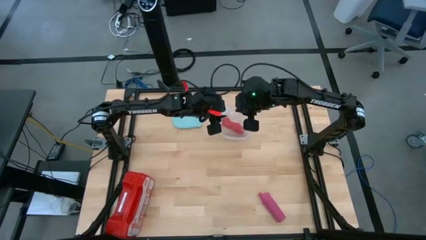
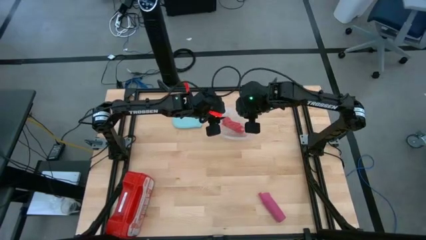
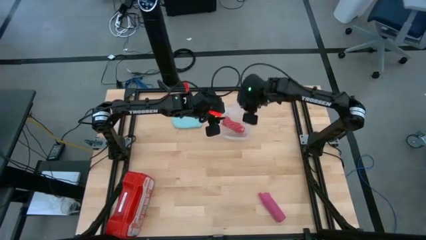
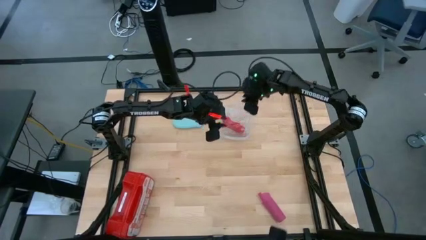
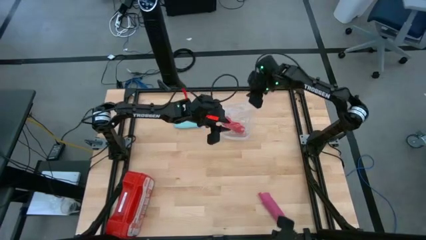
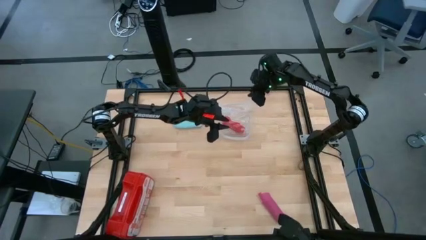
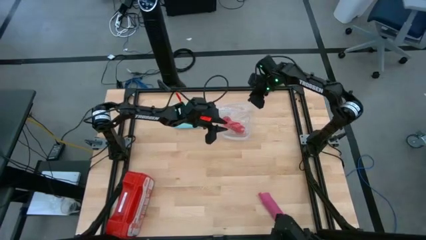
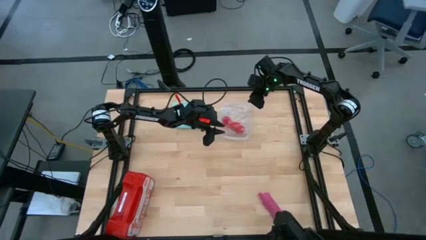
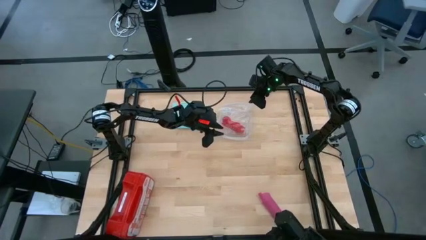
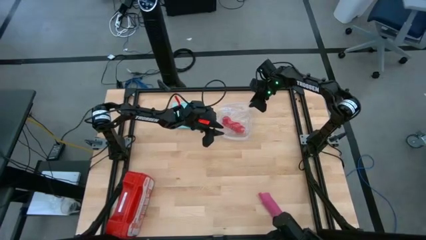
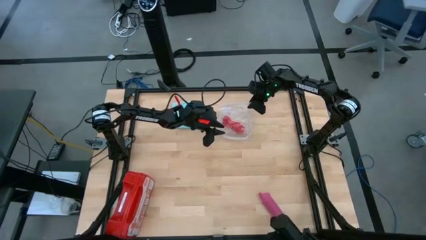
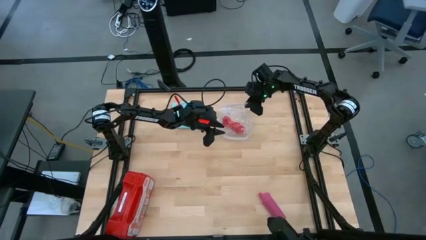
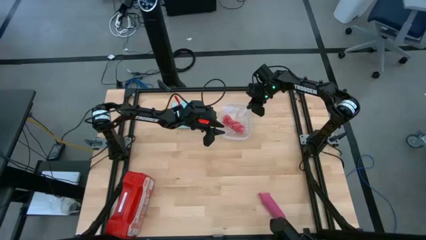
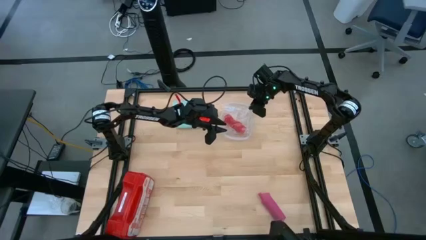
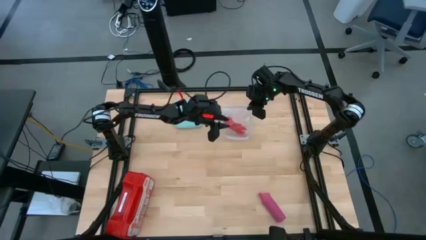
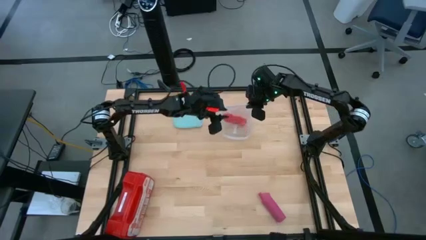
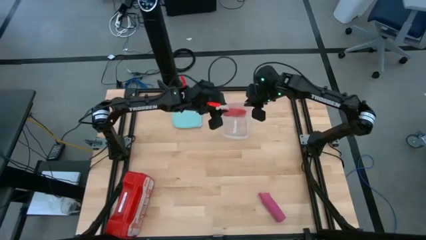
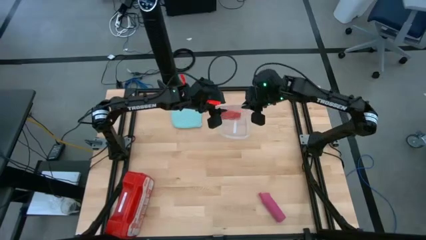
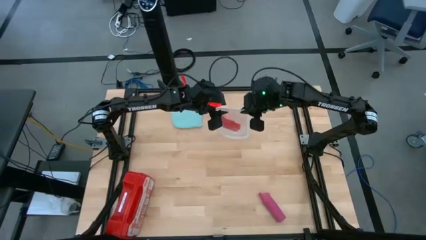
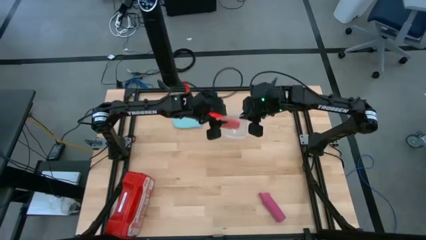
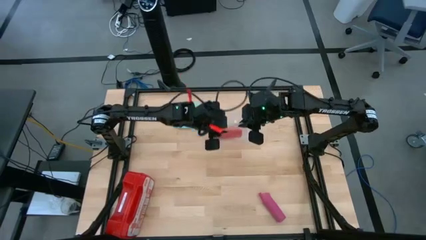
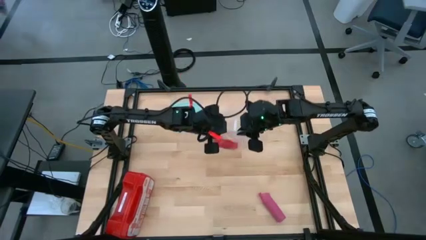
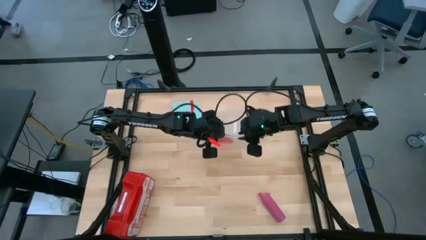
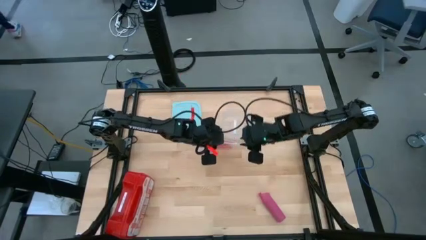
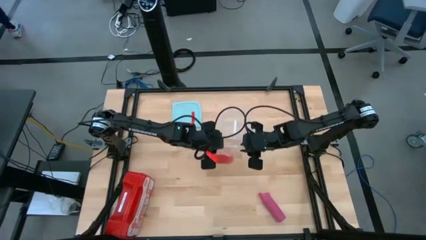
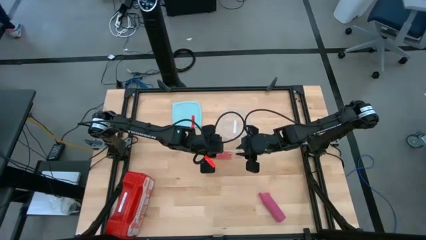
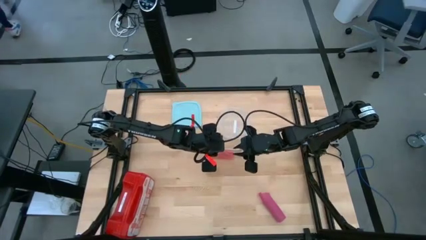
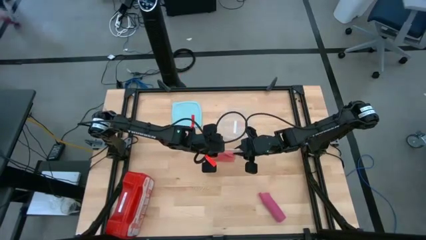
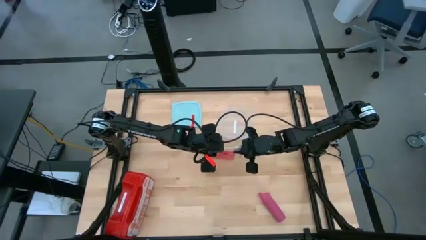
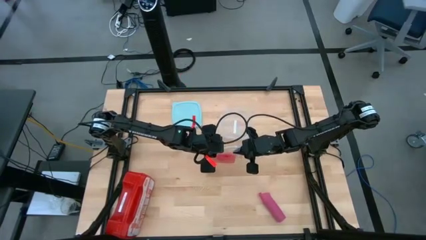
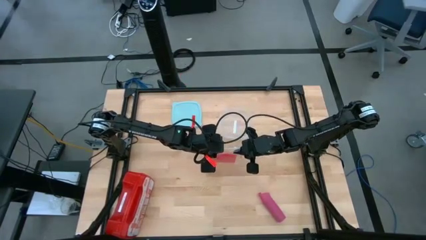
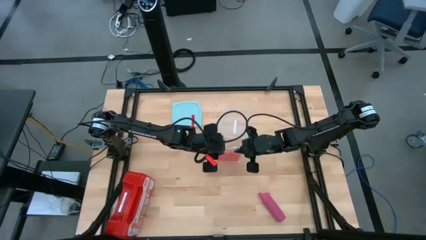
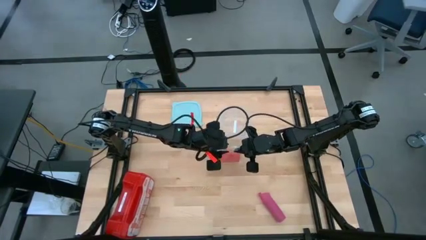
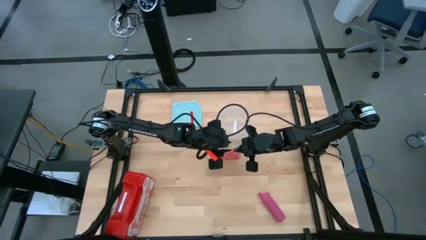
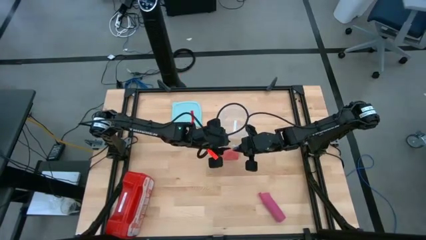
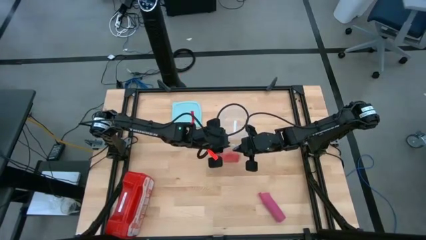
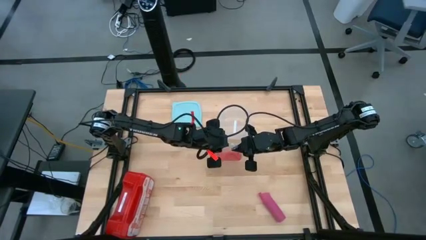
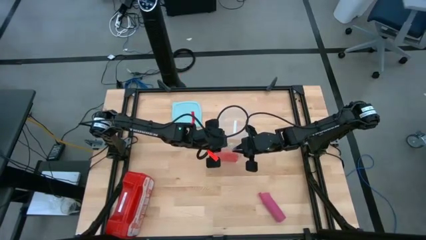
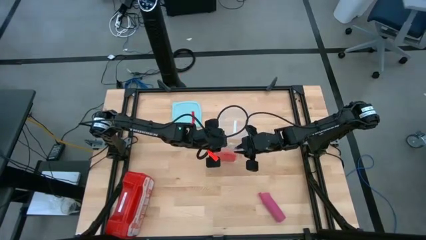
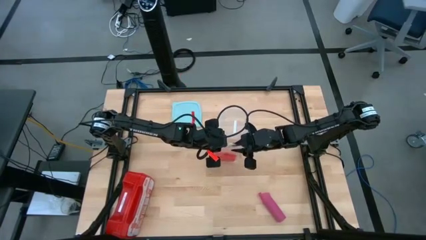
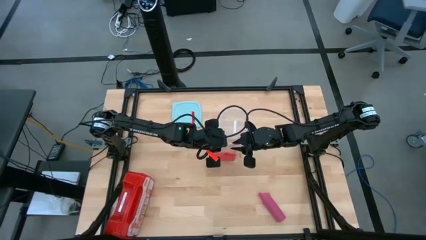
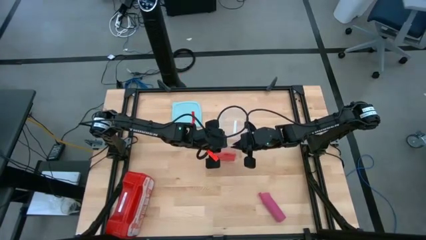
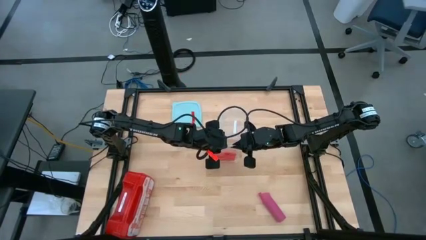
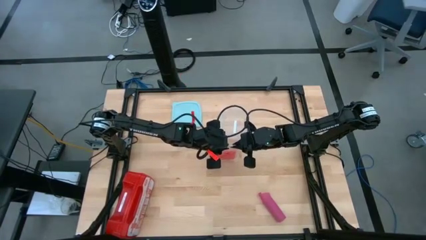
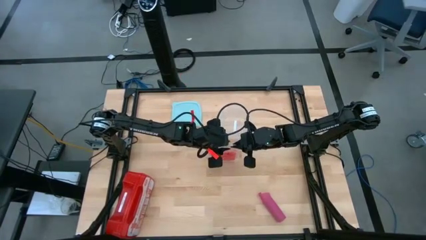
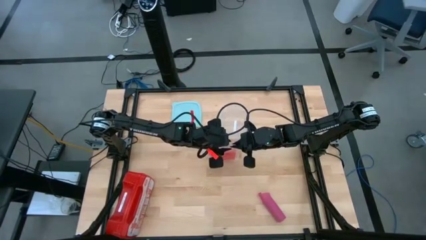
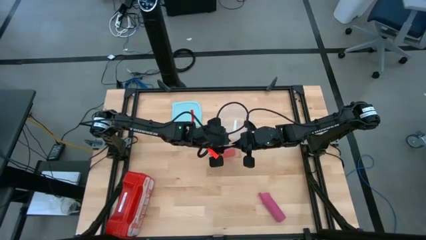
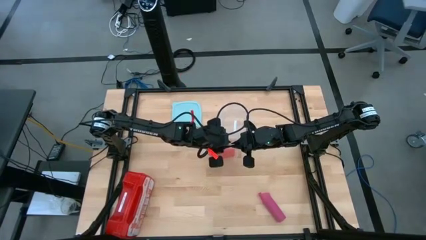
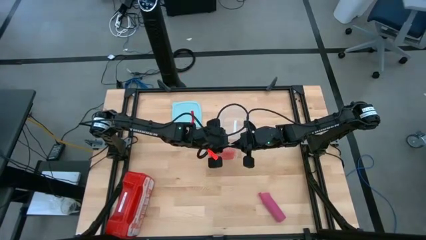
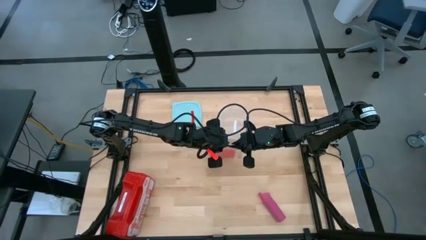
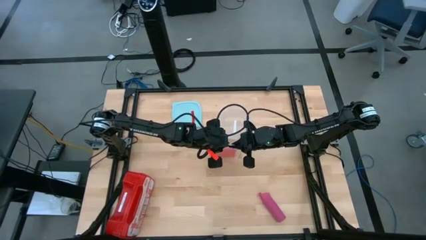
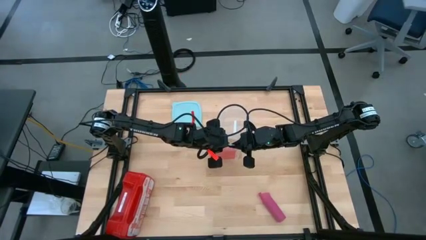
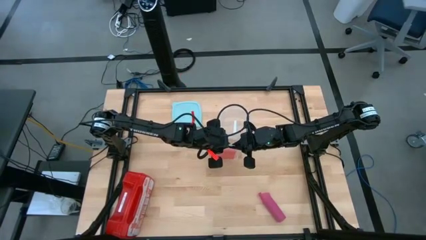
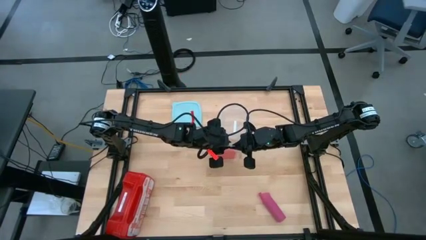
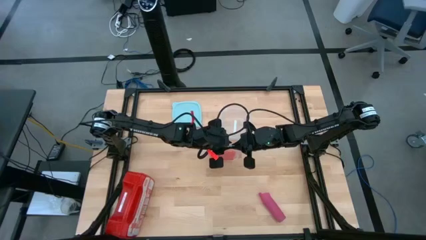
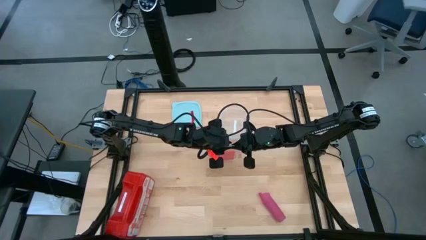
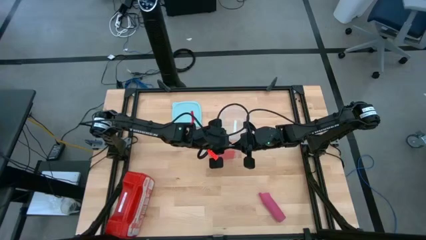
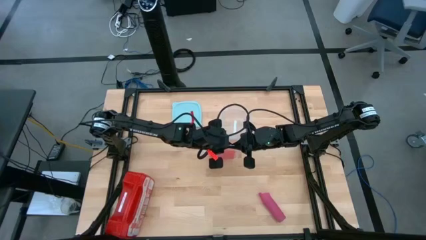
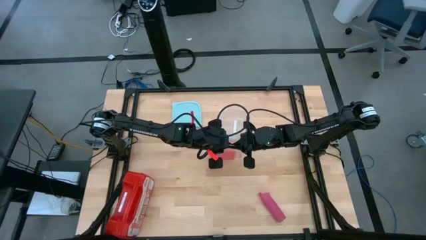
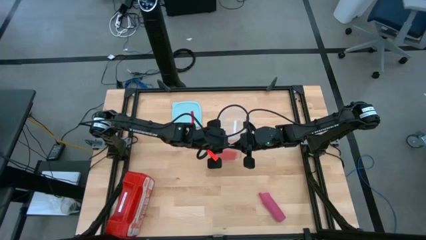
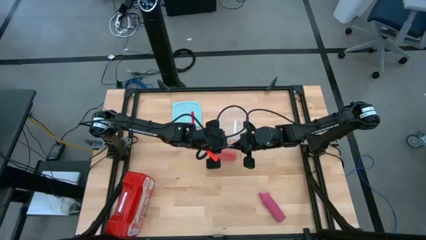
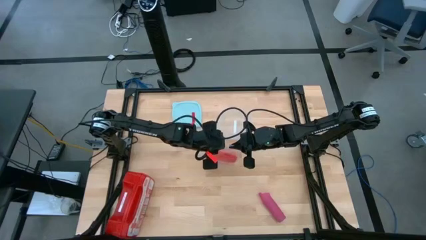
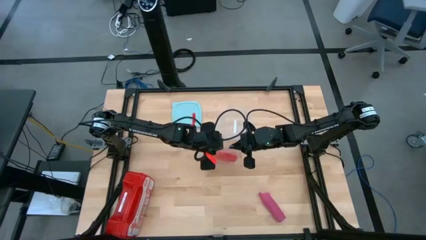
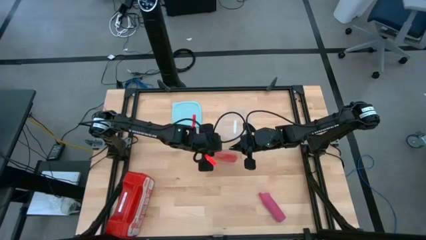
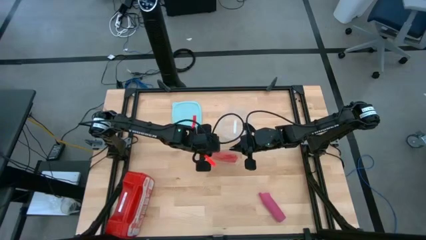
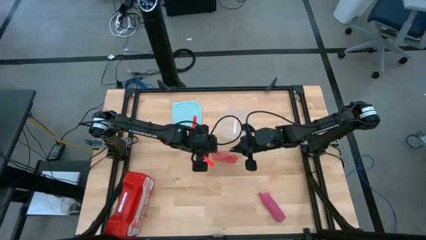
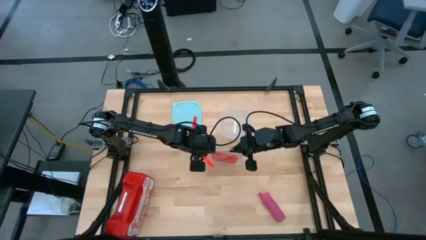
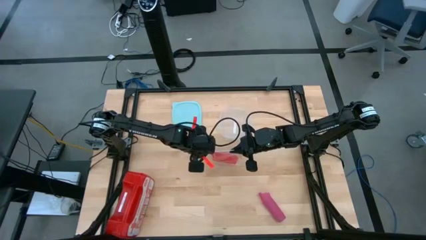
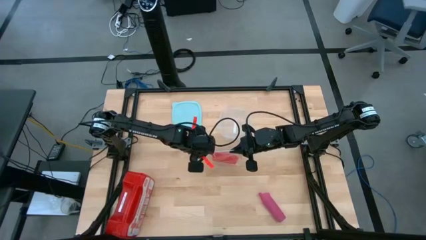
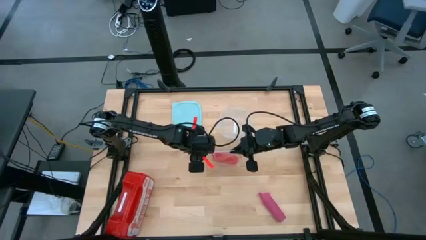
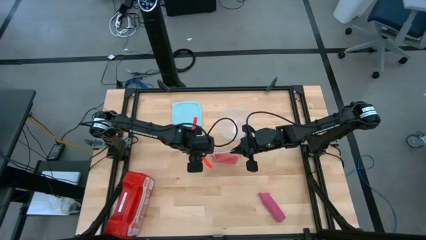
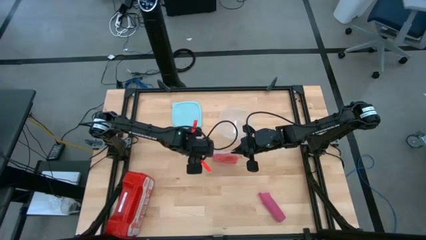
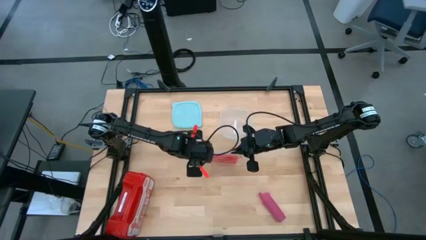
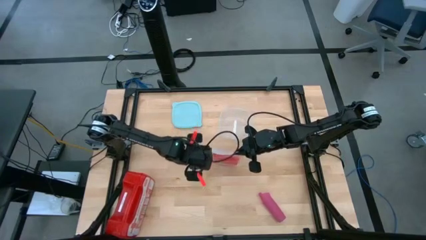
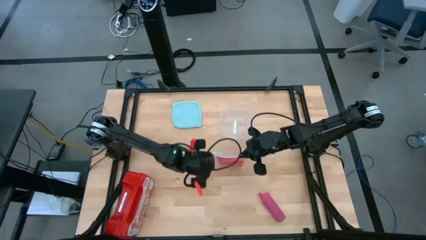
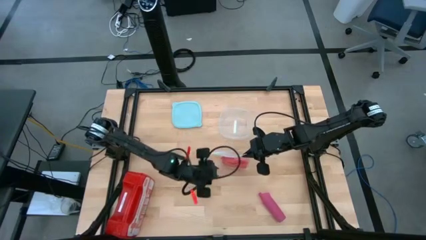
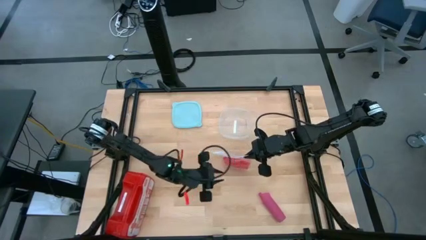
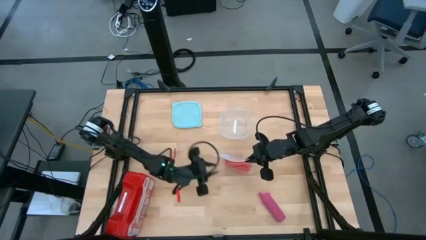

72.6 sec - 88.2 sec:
Task: Roll bandage
Open the transparent zip bag
